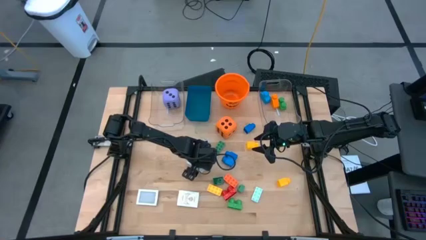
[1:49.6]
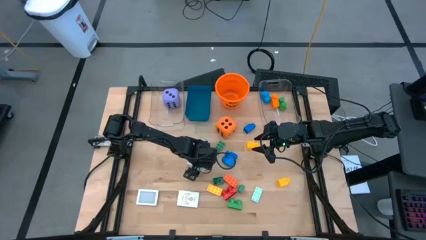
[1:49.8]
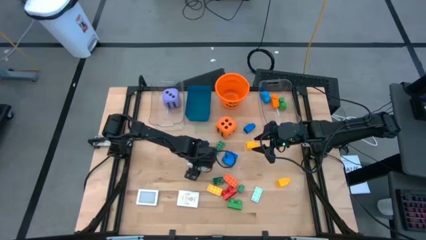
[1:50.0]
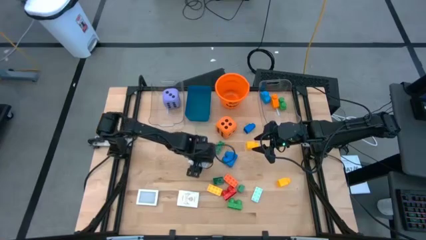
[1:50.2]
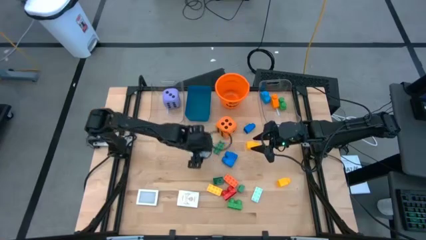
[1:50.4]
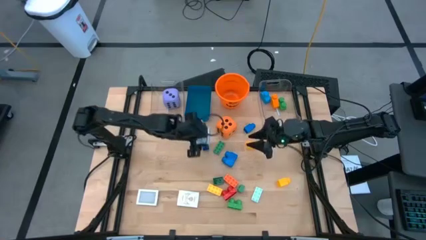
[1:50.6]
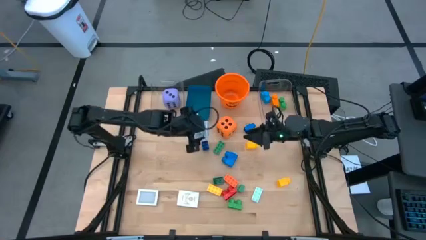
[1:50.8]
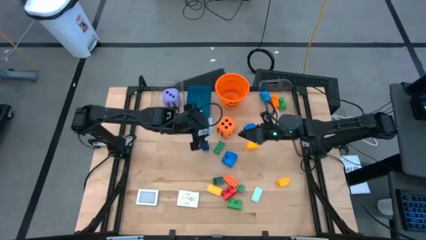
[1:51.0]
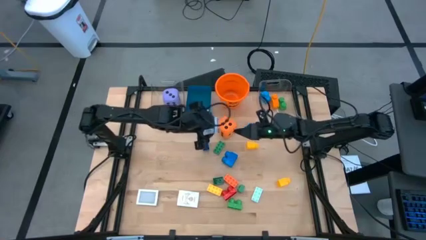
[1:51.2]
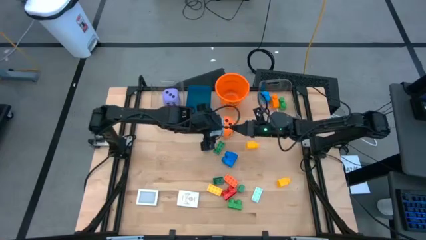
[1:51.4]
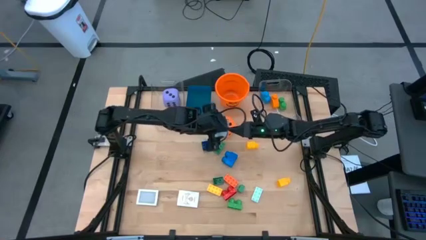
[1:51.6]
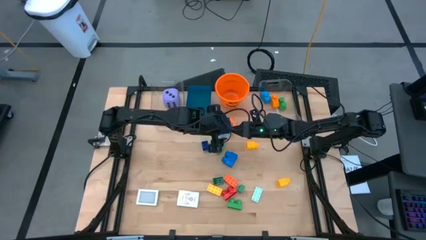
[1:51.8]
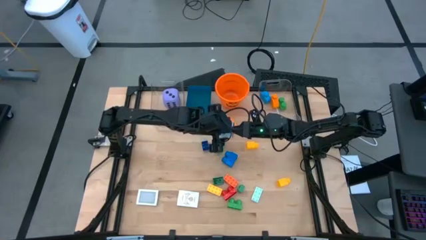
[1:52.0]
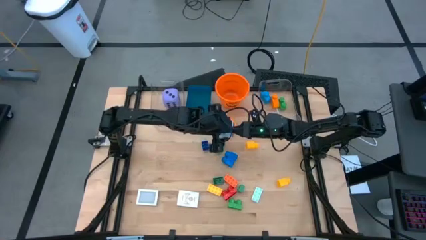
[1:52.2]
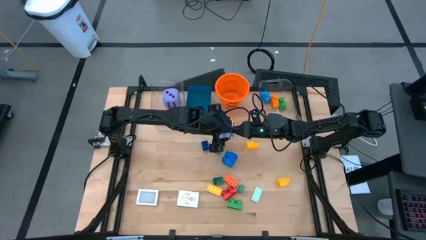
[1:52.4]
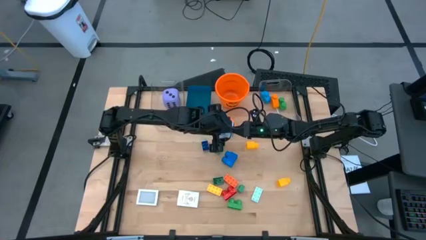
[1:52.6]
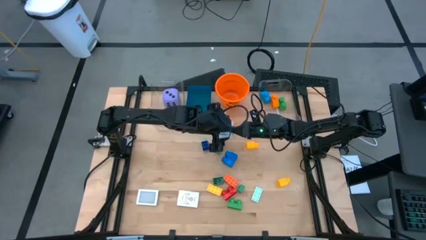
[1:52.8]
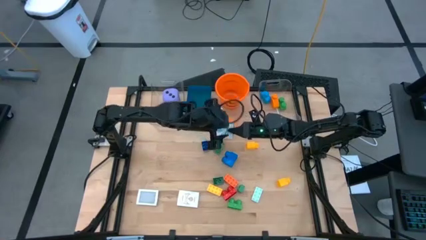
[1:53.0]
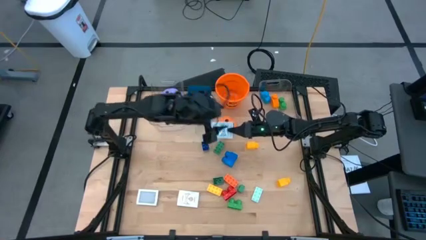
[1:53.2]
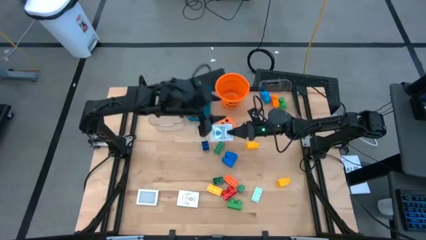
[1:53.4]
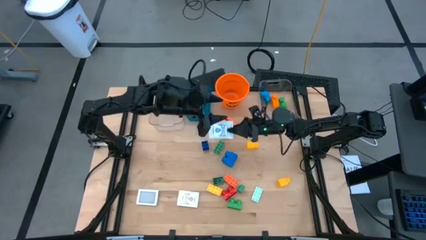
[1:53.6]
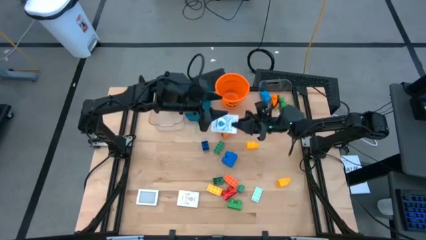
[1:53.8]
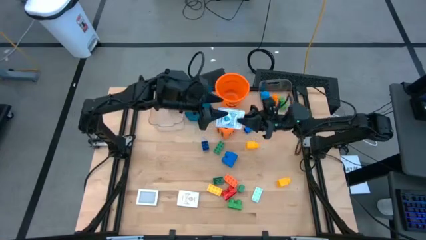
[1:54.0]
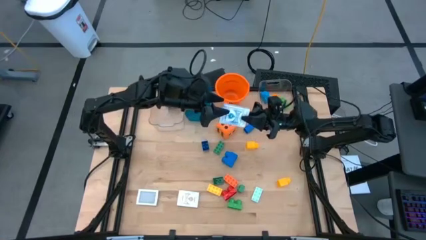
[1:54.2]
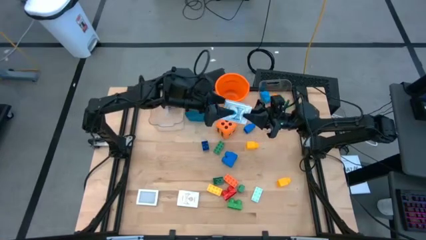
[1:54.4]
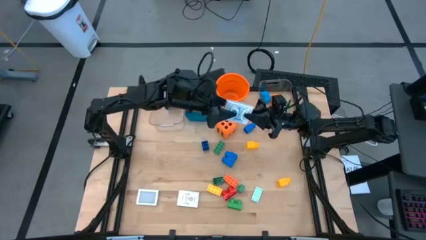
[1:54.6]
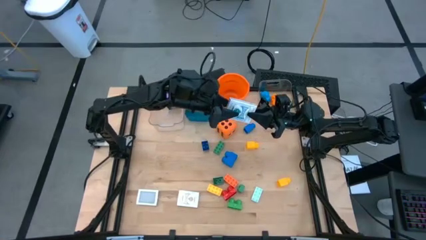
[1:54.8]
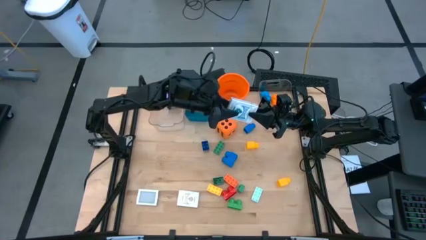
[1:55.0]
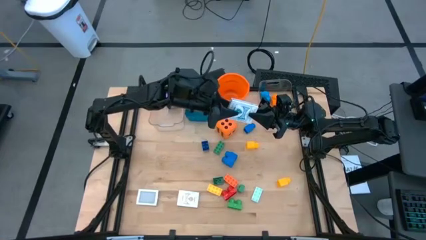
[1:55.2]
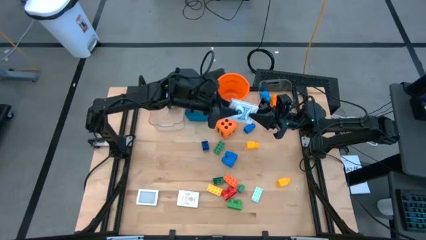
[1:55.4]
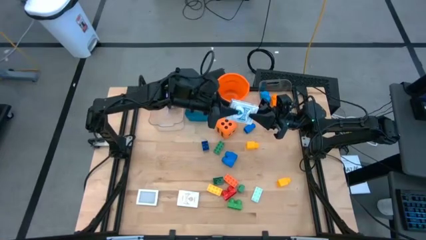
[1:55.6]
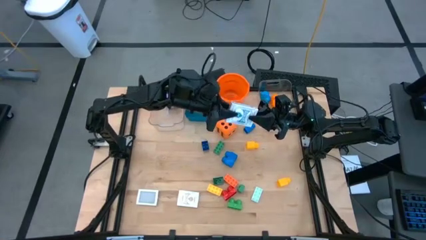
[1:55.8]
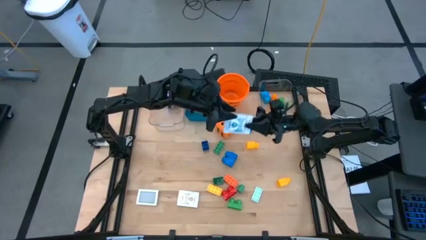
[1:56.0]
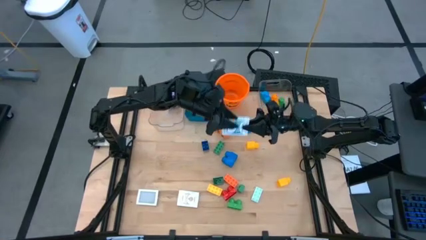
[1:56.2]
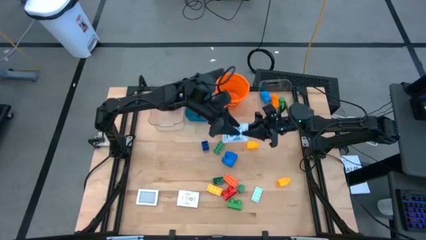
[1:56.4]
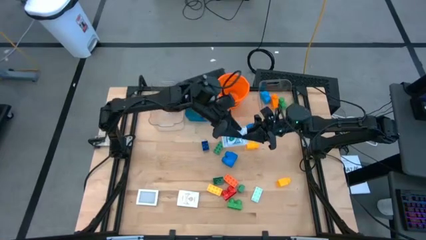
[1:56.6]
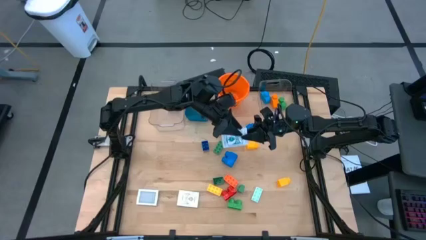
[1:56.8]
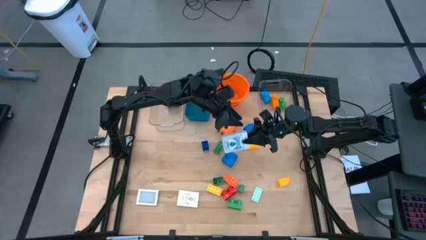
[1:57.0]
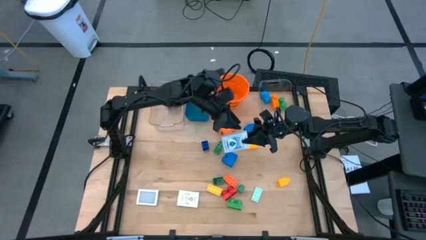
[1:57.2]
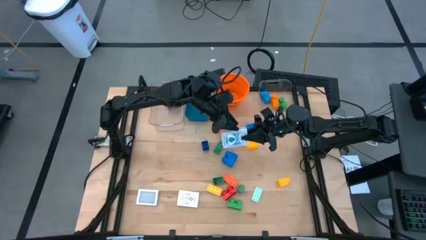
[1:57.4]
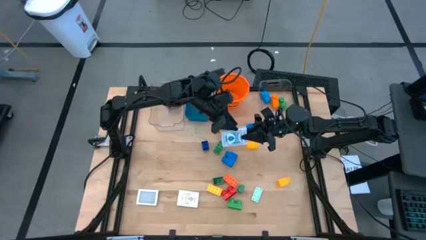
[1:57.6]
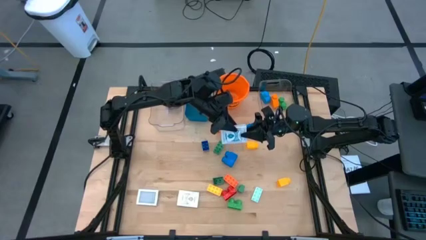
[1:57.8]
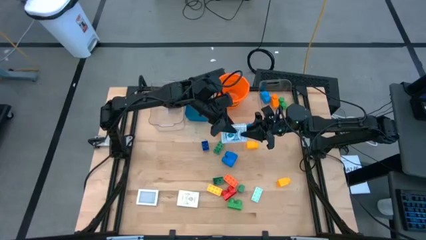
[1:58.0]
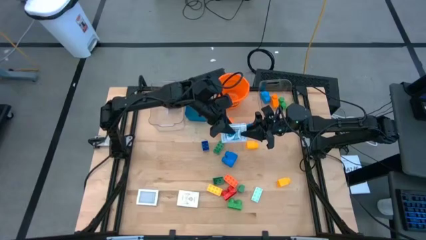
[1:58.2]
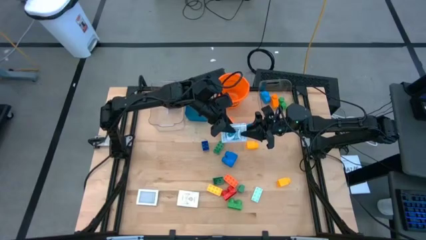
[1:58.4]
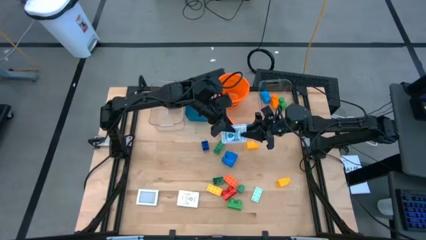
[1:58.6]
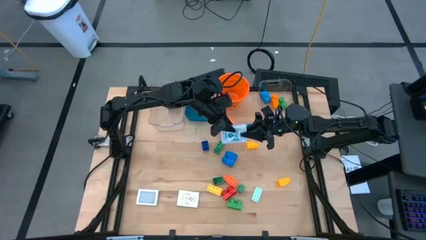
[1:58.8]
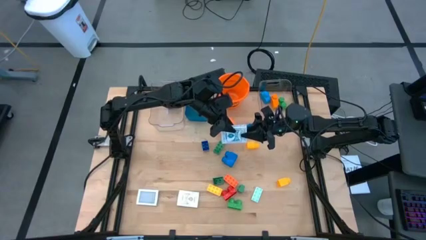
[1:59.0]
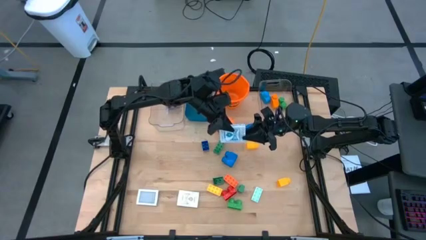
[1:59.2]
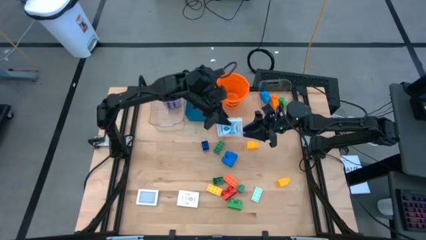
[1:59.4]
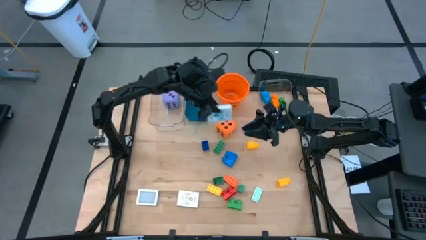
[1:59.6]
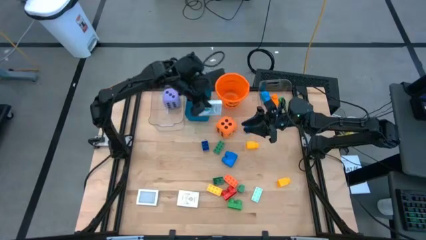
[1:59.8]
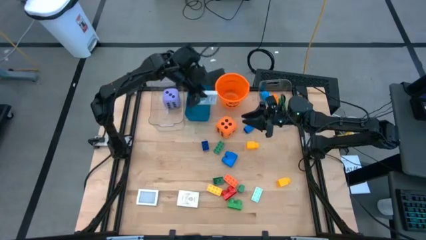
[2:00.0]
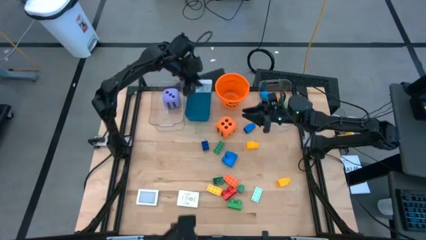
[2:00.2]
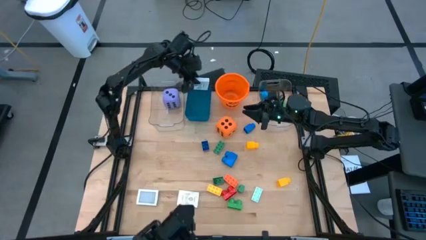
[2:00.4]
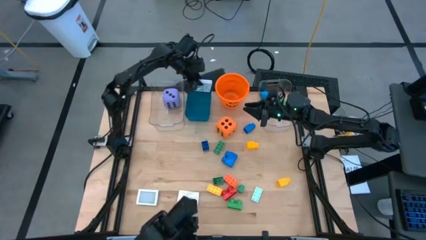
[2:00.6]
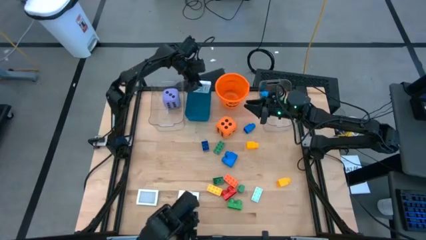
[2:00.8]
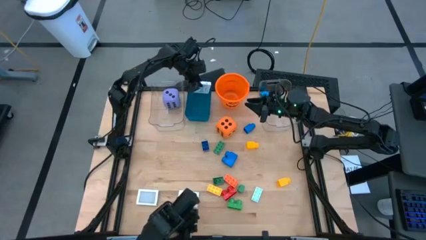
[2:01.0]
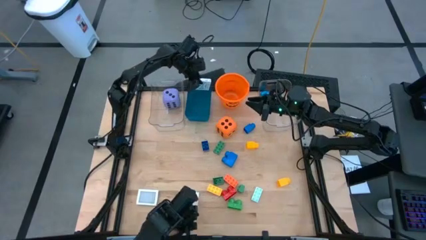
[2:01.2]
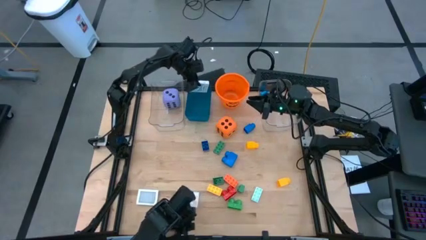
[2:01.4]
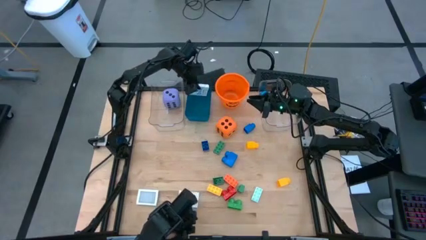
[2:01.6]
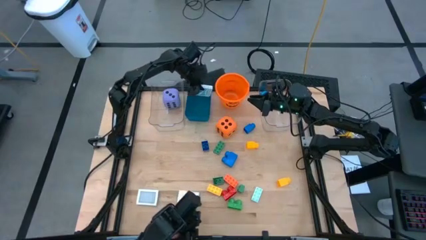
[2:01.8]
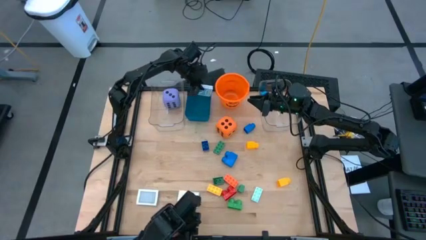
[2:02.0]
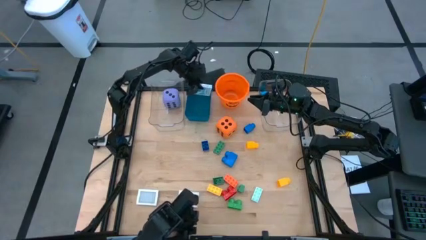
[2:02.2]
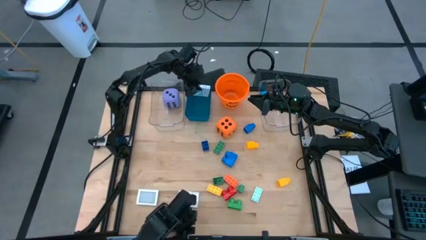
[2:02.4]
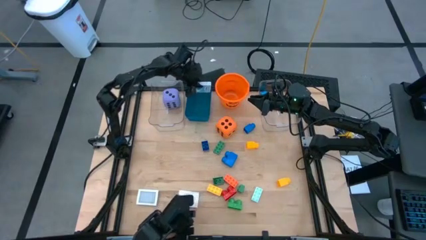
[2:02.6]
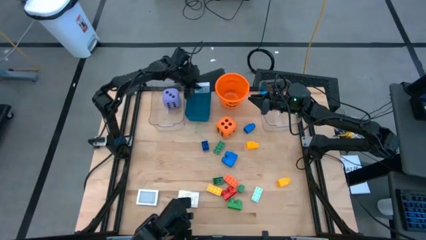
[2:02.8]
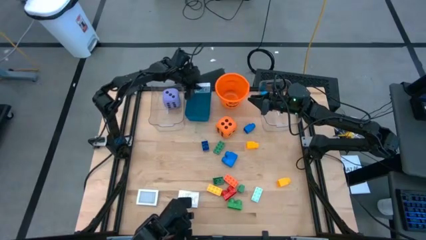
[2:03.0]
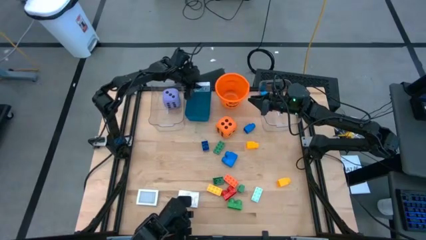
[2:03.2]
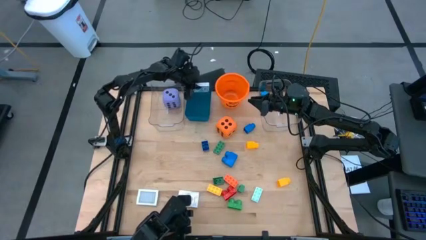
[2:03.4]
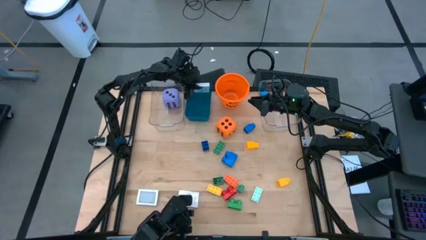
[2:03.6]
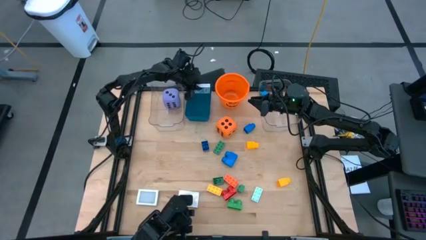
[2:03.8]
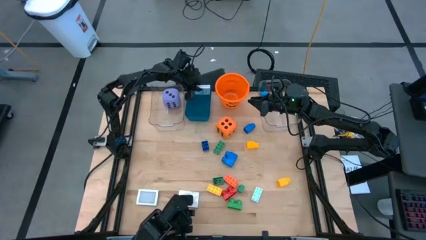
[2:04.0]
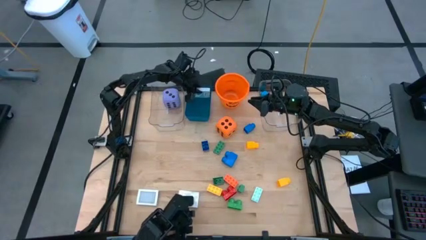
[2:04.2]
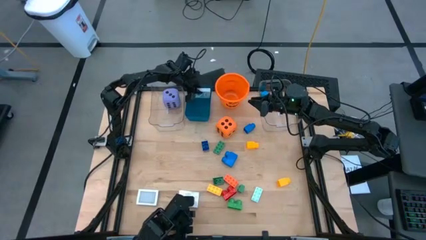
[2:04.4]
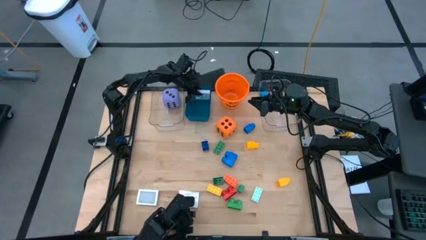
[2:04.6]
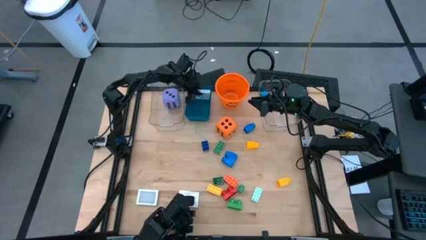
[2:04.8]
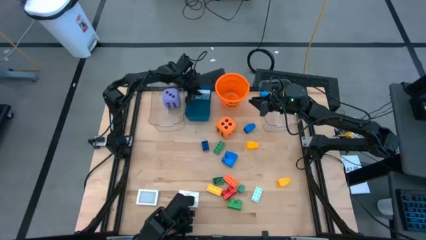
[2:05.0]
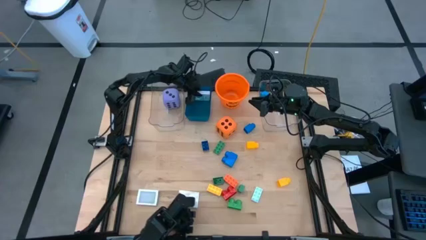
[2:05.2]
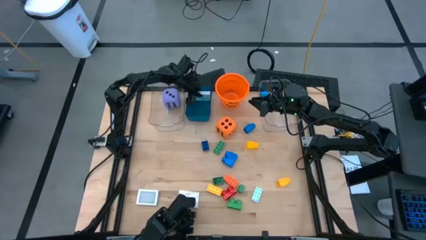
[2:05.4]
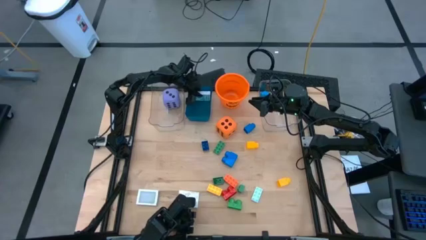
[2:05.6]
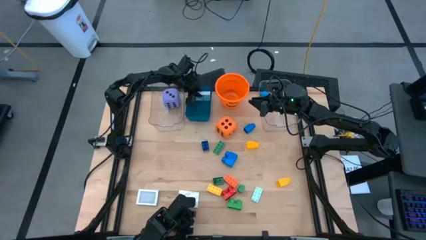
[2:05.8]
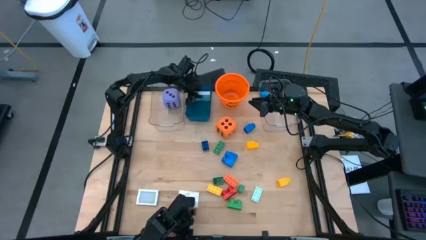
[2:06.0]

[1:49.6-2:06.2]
Task: Pick & Place Toys
Put the blue deck of cards into the blue bin
